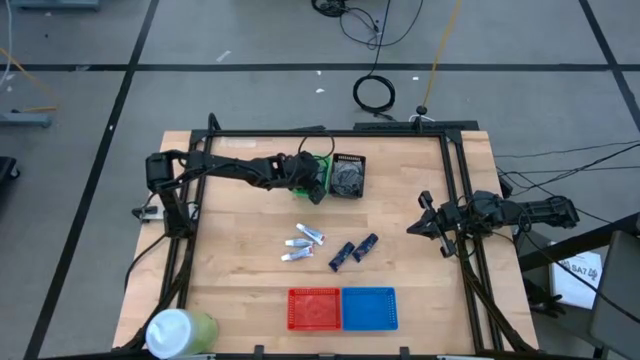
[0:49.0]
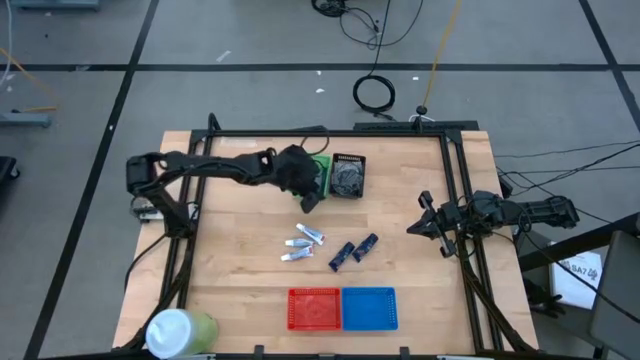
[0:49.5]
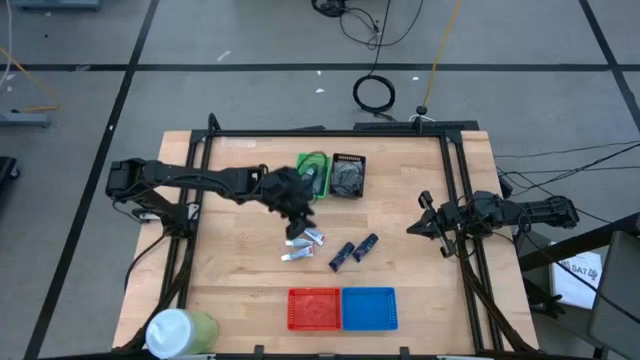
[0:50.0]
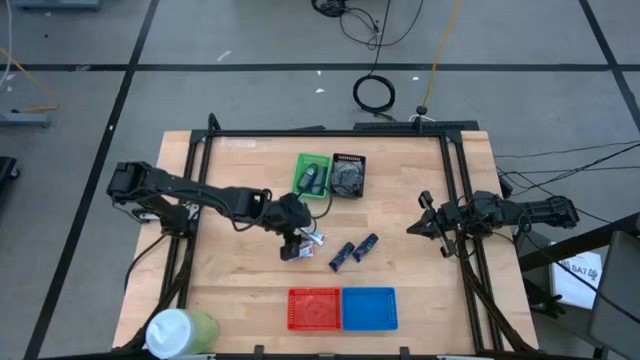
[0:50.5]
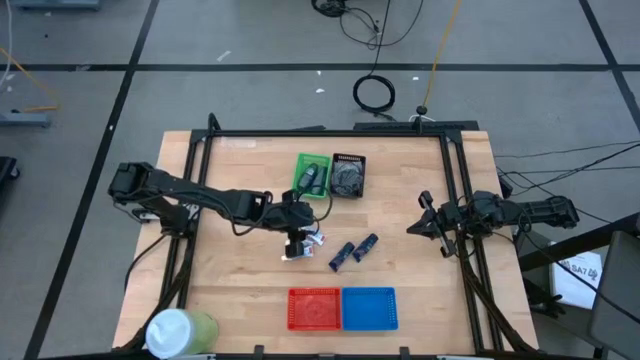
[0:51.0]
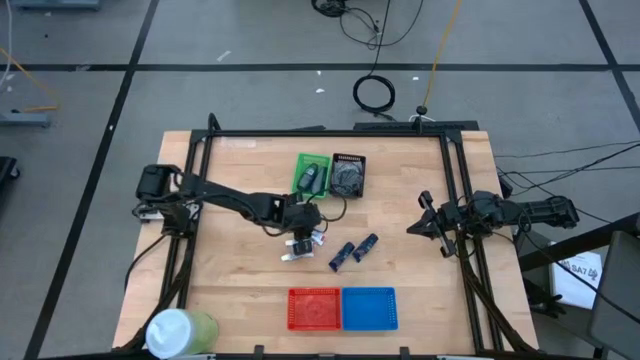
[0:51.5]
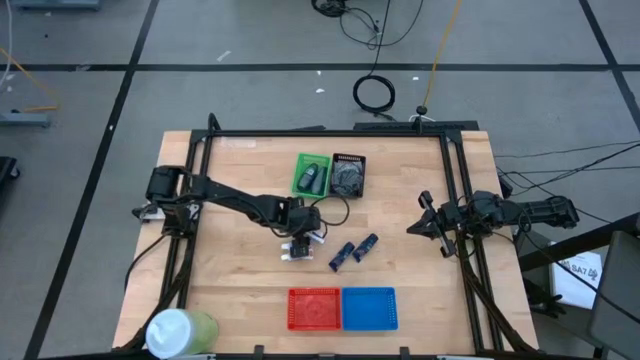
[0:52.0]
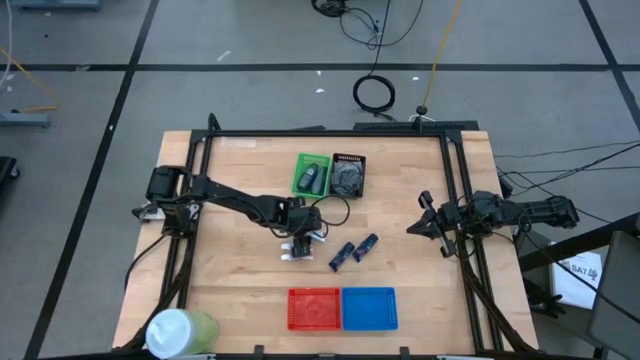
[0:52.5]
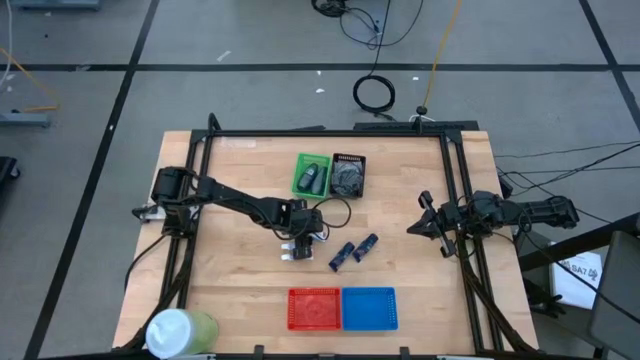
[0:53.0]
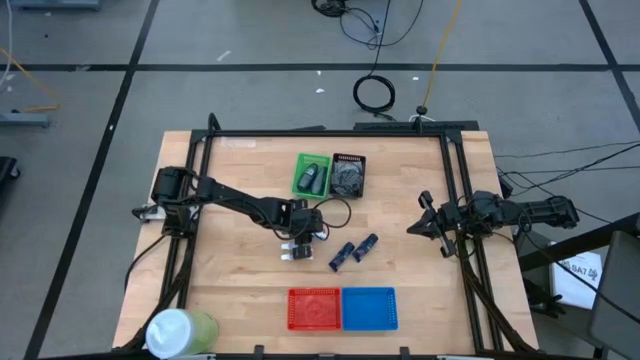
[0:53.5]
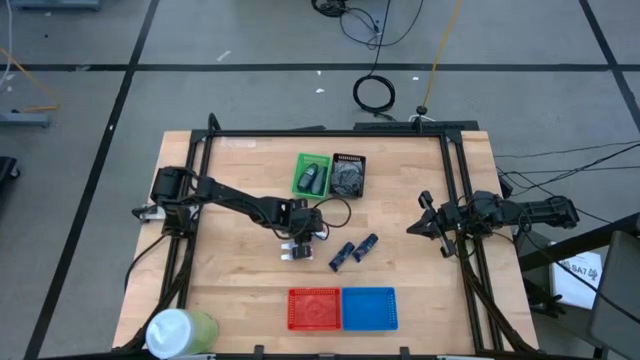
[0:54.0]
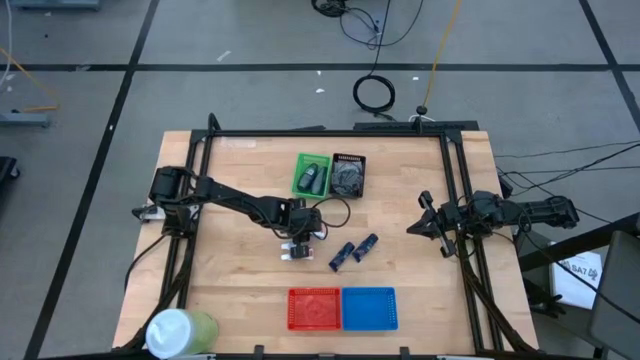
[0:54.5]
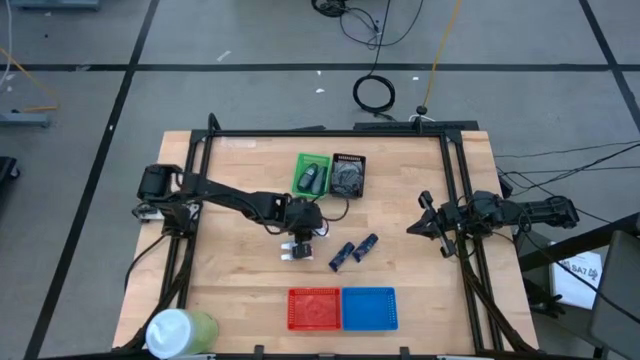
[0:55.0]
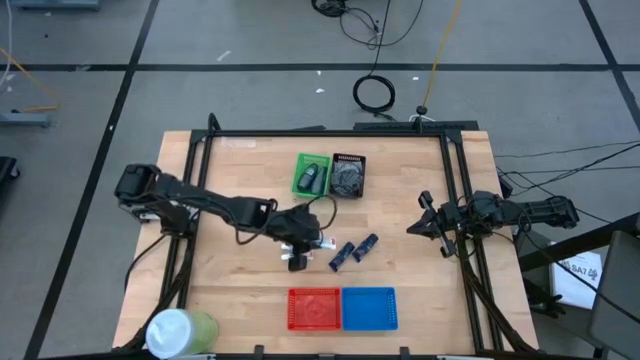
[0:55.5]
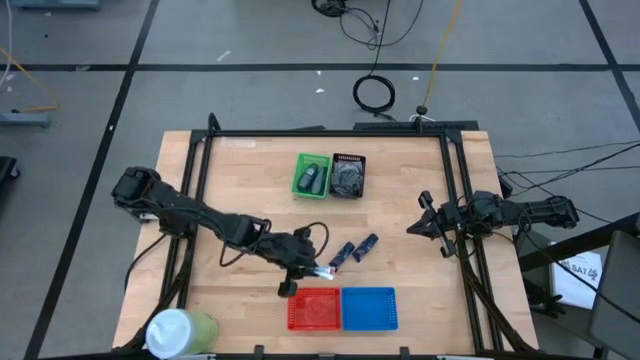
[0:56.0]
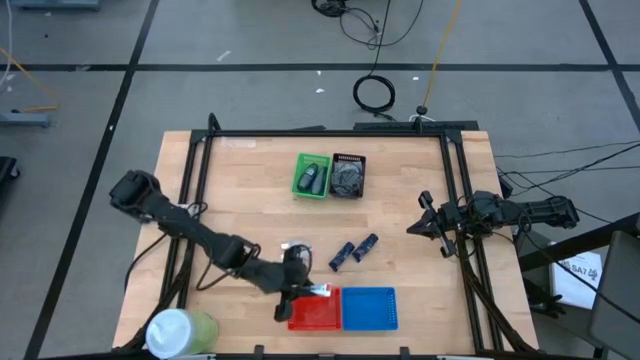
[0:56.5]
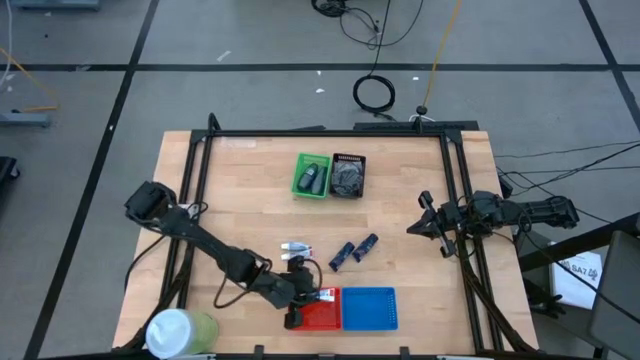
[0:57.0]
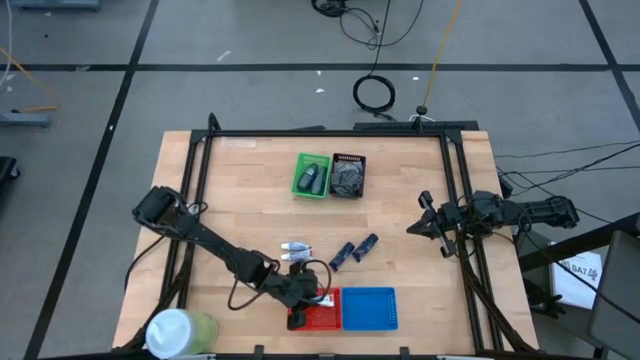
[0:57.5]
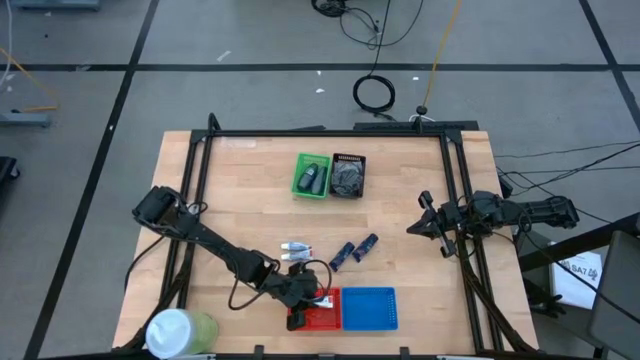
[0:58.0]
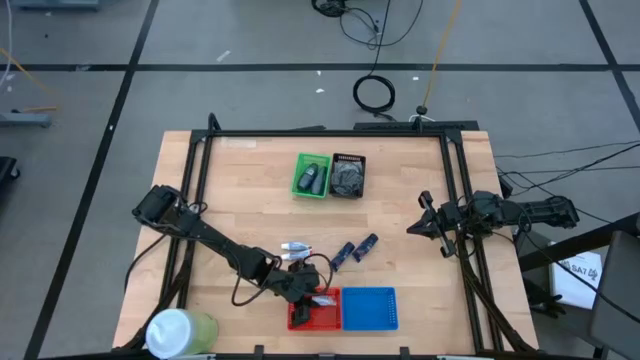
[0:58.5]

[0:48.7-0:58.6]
Task: Pick & Place Travel size toiletries
Put the top toothpaste into the red bin

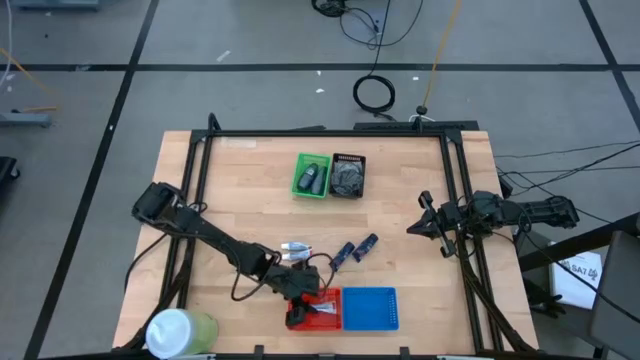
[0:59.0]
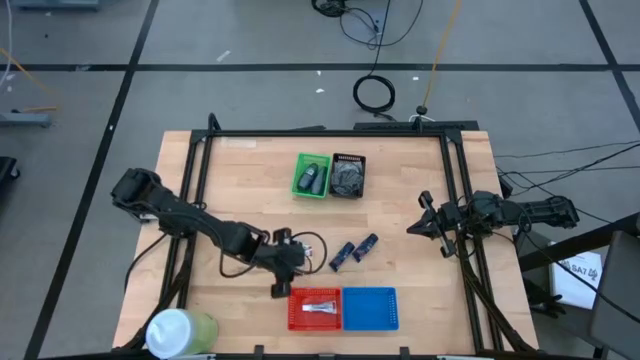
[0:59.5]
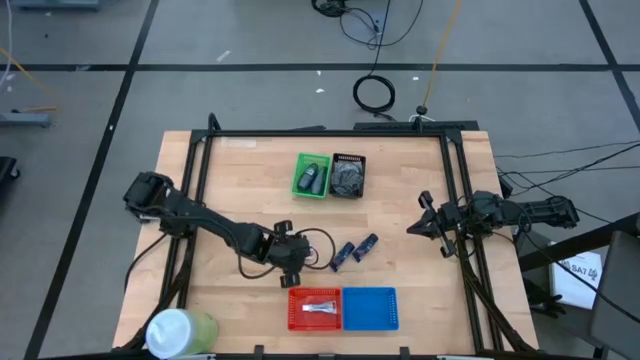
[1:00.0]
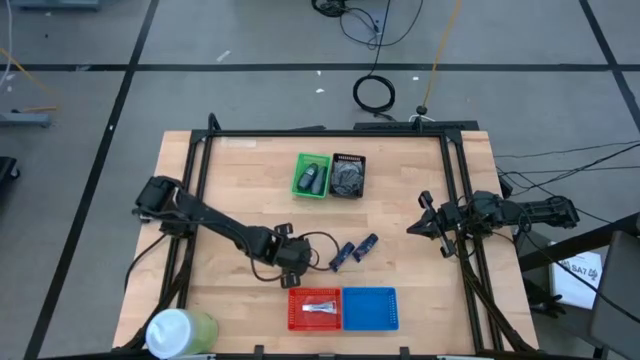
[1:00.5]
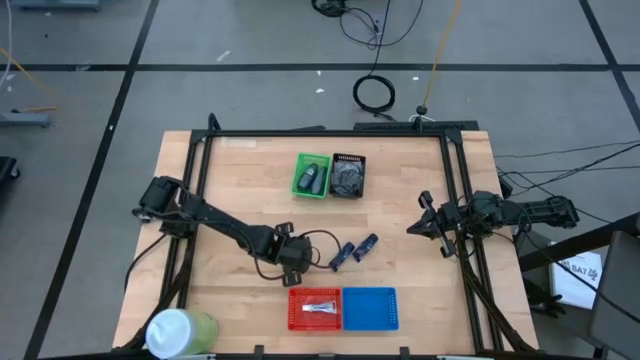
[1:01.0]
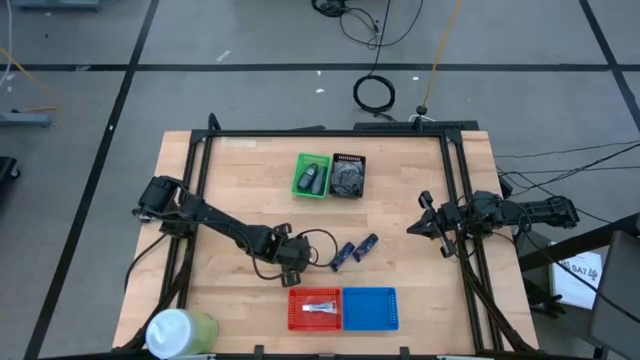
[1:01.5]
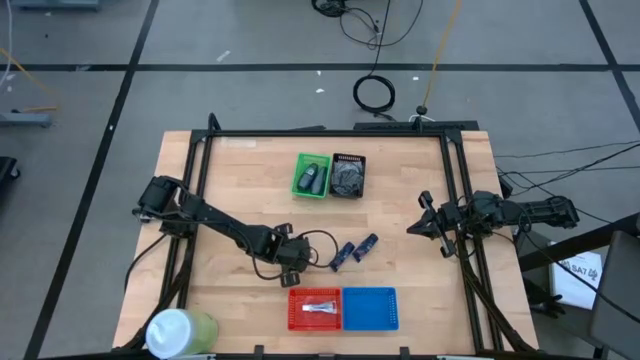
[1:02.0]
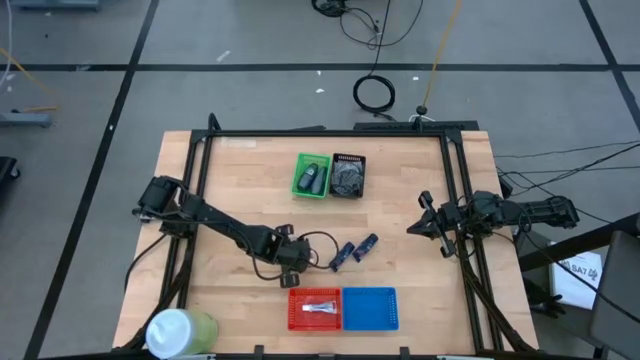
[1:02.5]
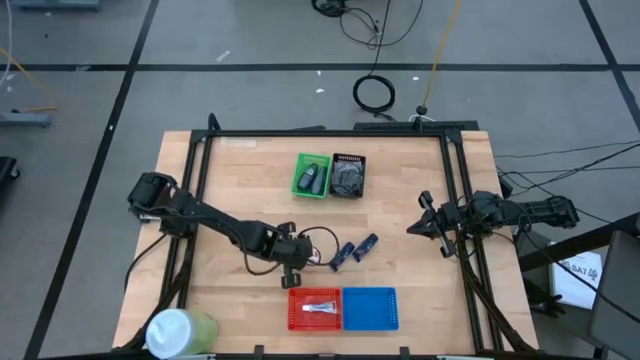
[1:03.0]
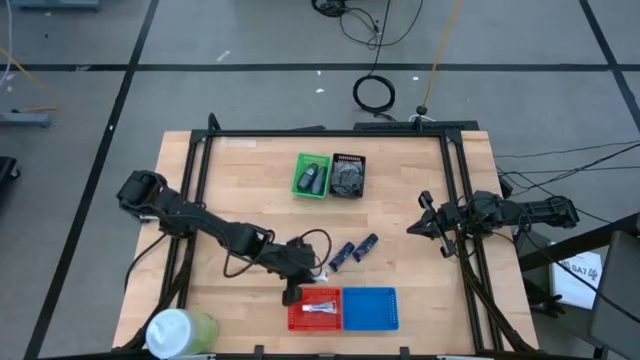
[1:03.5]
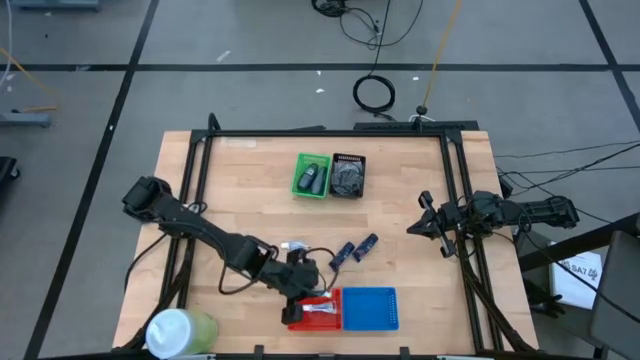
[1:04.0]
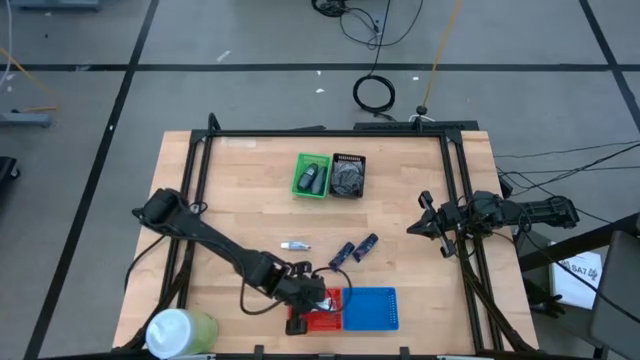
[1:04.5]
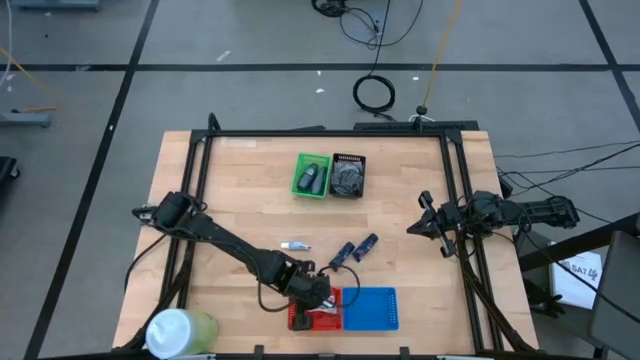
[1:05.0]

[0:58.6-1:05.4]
Put the bottom toothpaste into the red bin

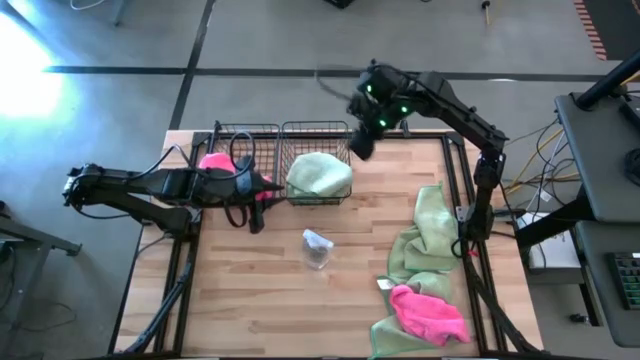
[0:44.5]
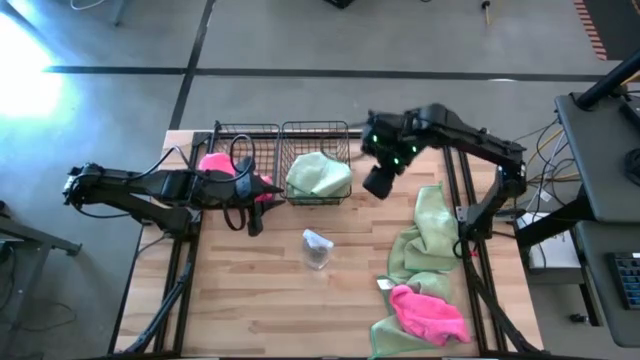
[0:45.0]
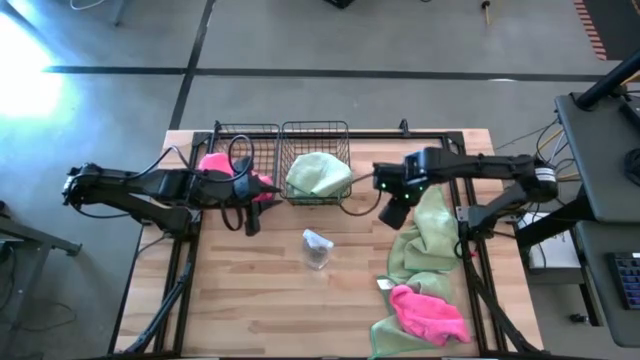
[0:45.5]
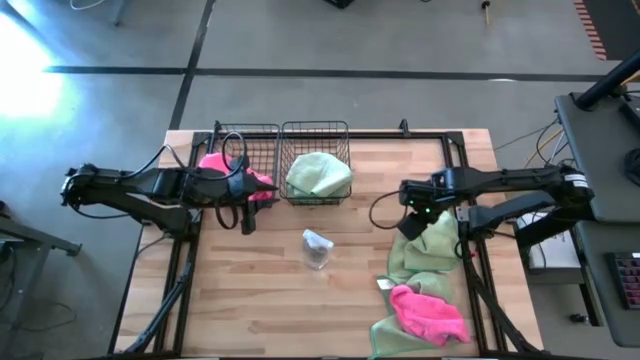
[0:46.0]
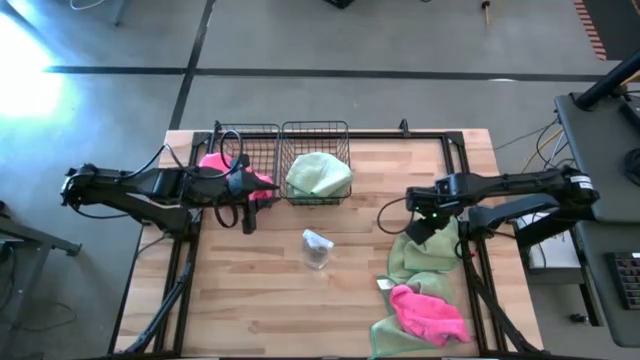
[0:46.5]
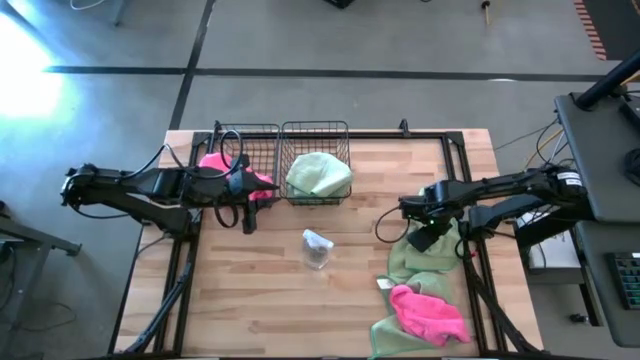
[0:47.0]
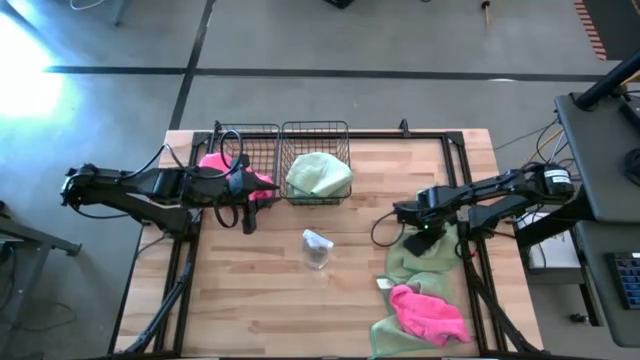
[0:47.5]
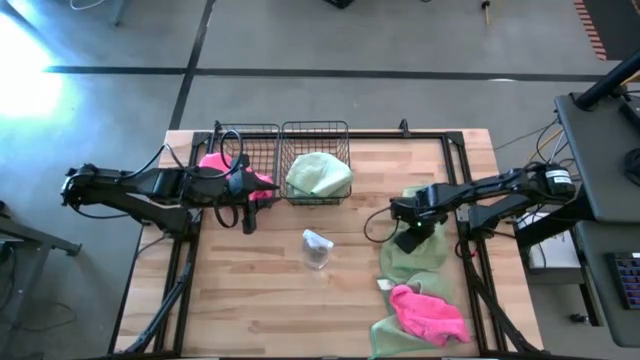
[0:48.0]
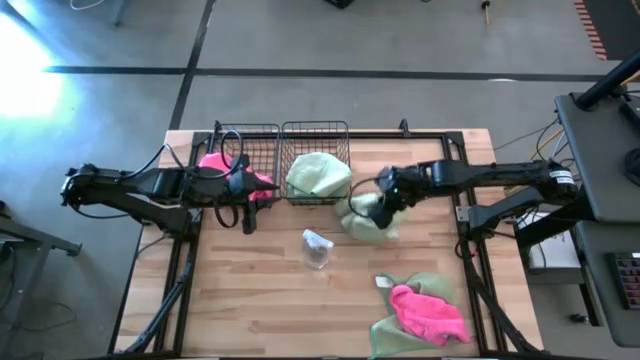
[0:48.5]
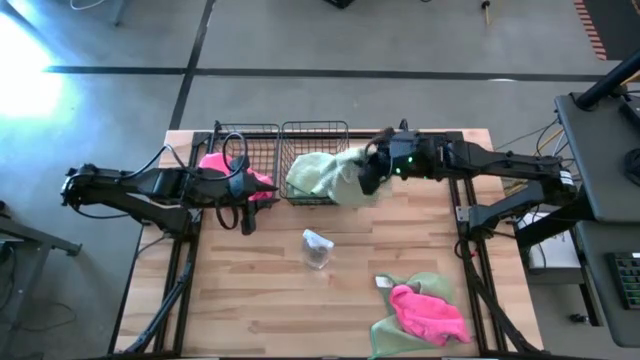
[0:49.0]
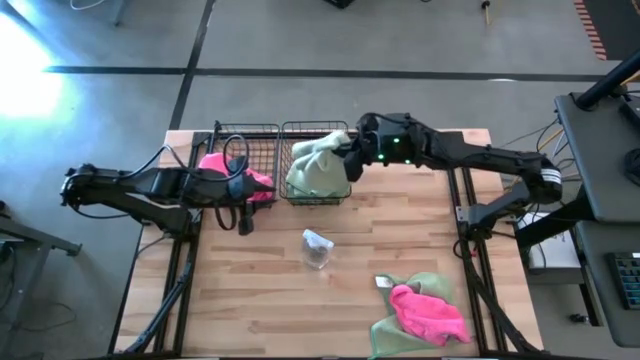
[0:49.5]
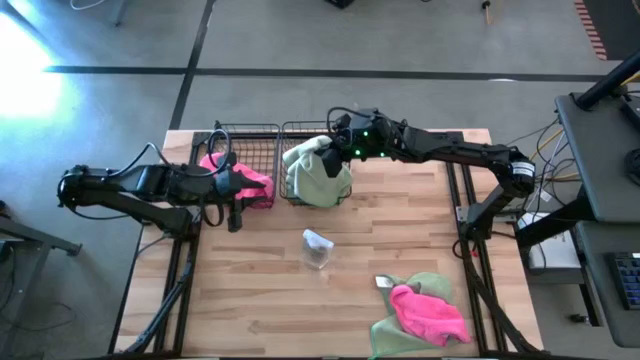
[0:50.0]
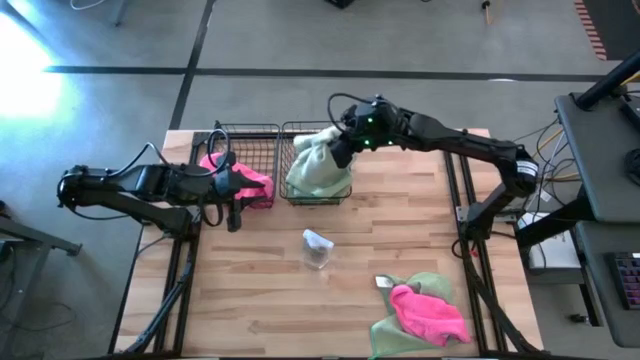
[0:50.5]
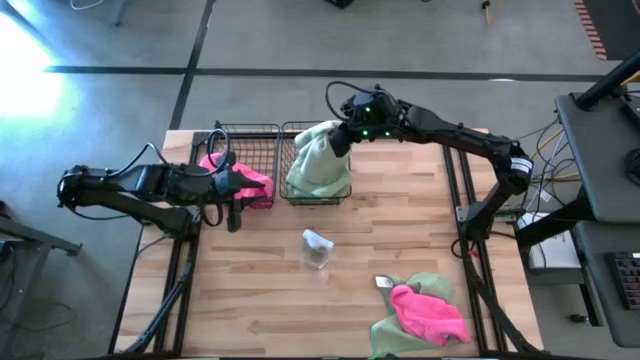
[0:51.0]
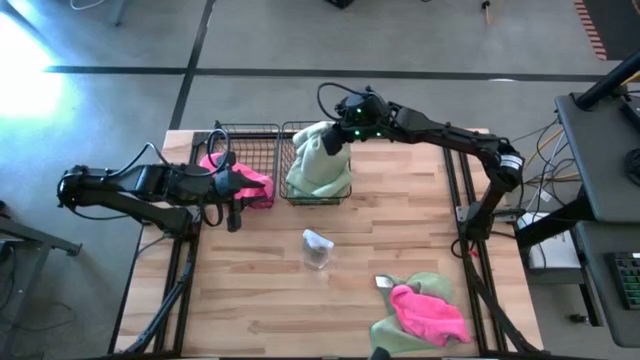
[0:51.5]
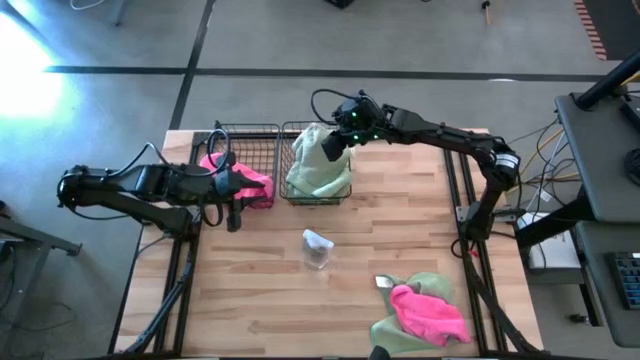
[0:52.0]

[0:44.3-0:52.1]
Task: Sort microfiber towel by color & place in baskets
Put the top green microfiber towel into the right black wire basket
